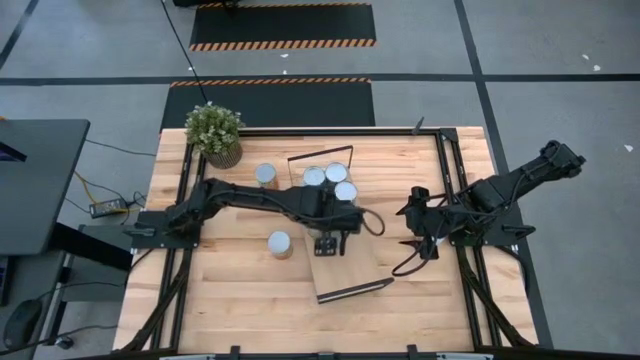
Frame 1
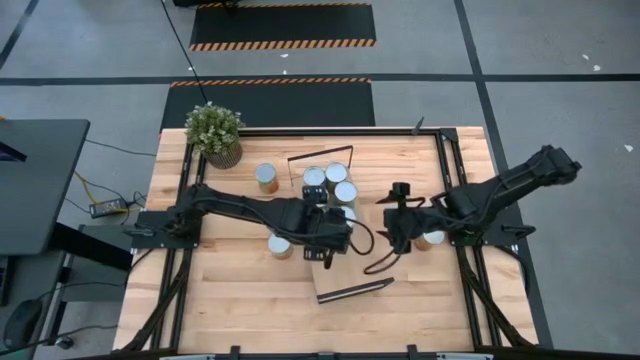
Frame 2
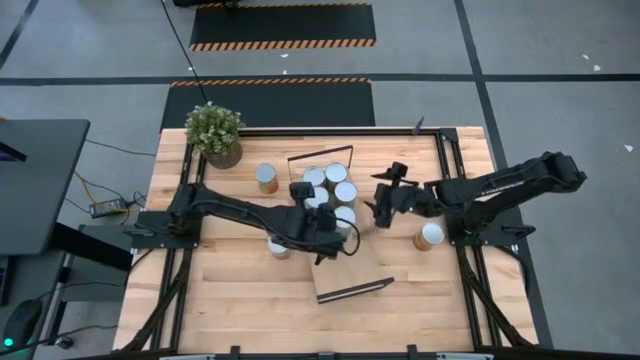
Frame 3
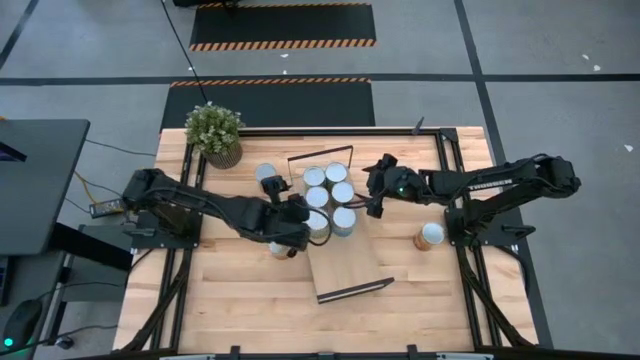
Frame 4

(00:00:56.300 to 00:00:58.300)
Task: Pick and place cans onto a shelf
Adjust the canned tomatoes on the shelf

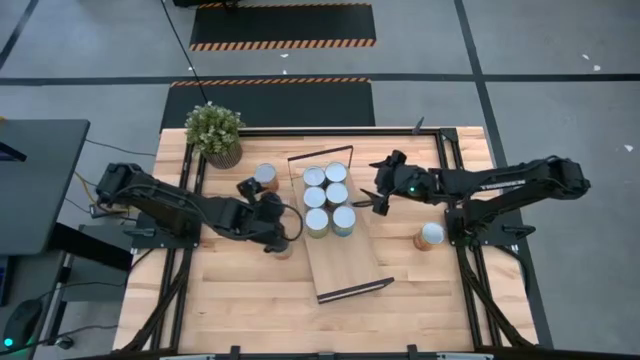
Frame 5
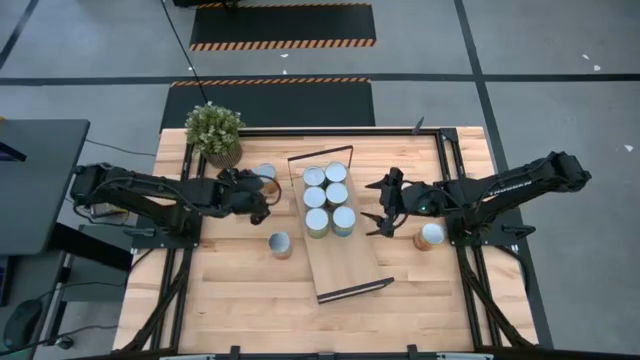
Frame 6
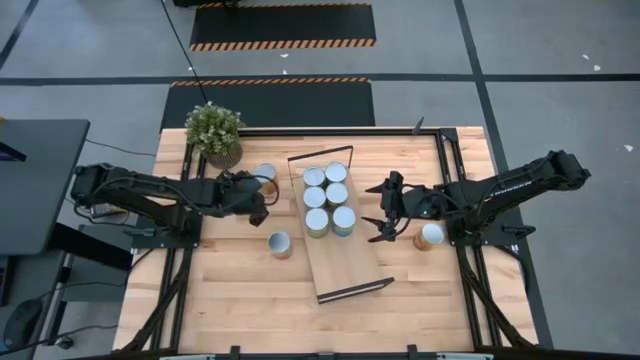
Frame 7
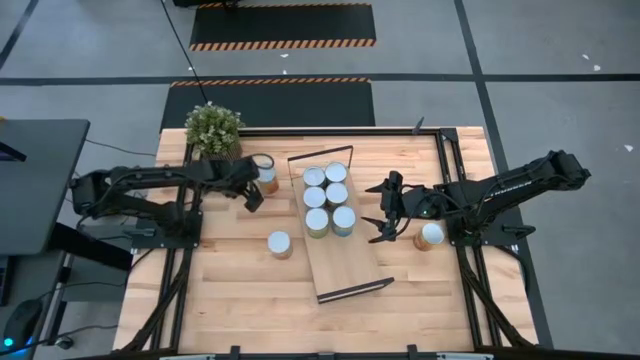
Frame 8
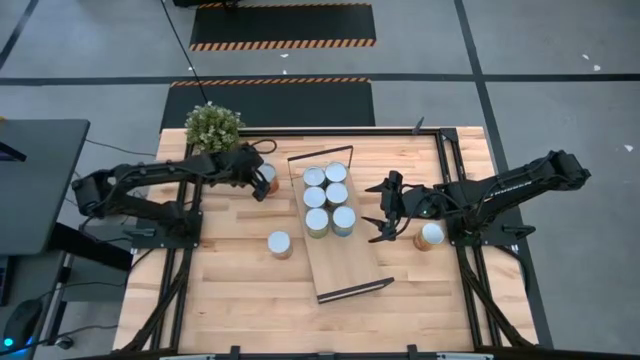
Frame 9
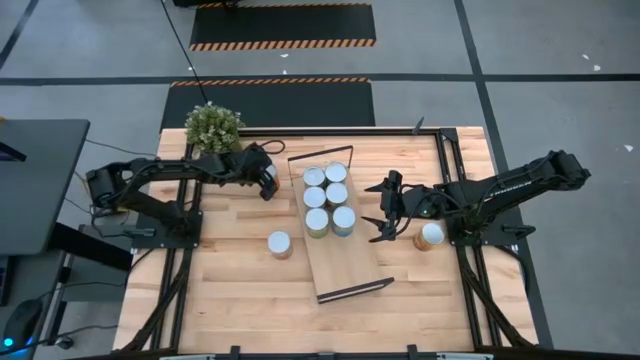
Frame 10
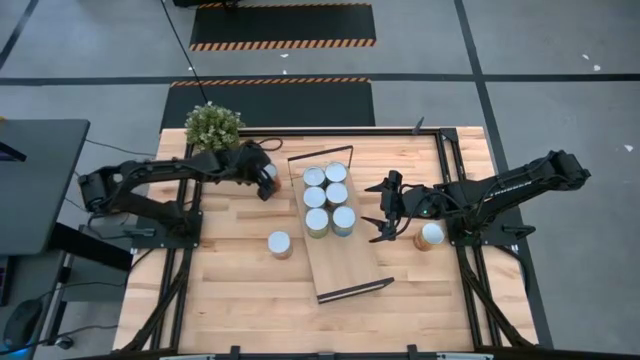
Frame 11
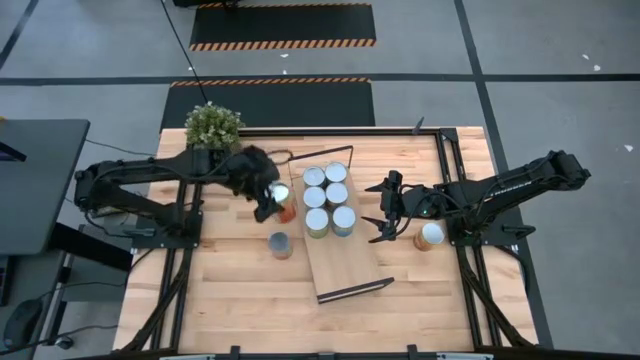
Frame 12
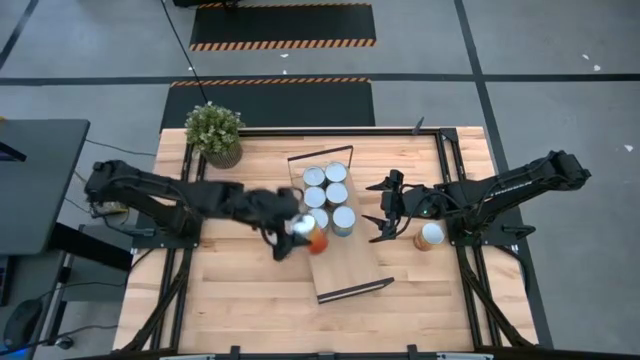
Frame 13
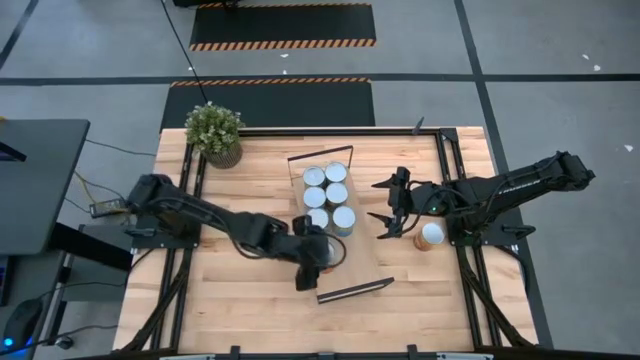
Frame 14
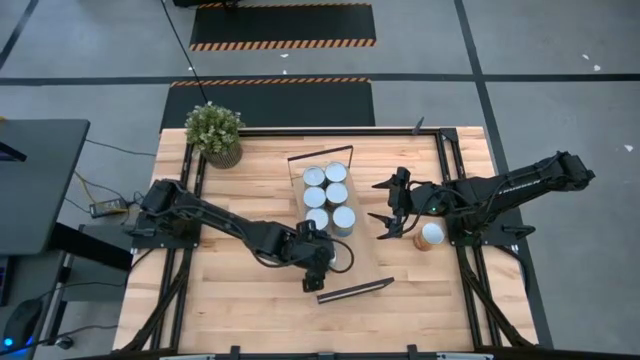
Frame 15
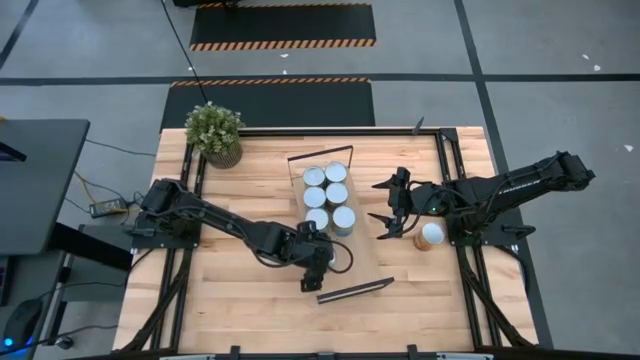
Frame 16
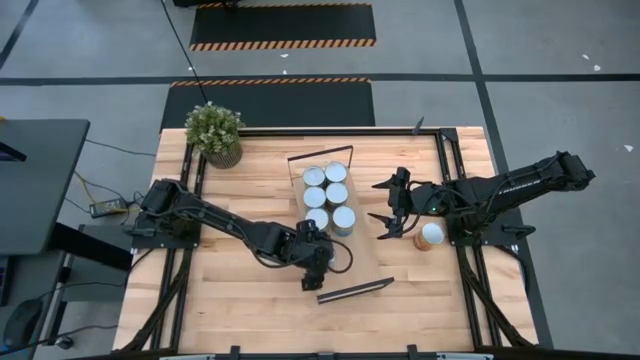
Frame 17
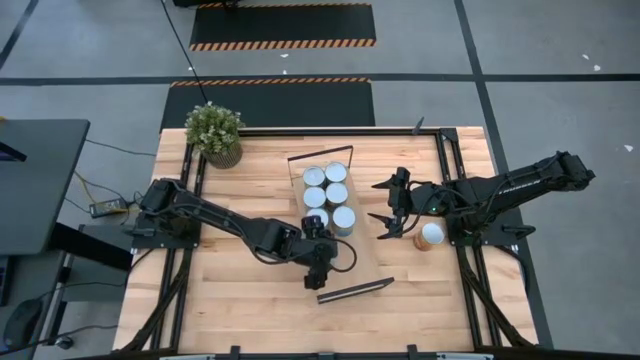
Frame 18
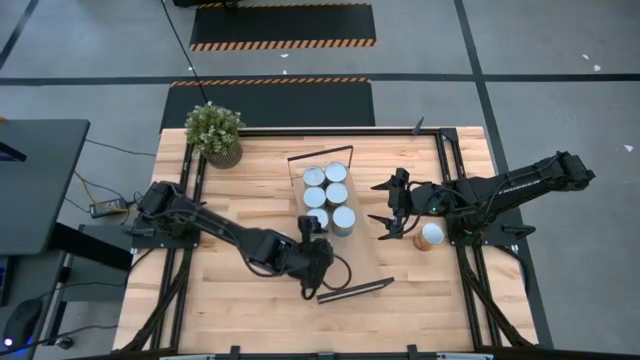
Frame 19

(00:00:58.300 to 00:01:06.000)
Put the top canned pineapples on the shelf

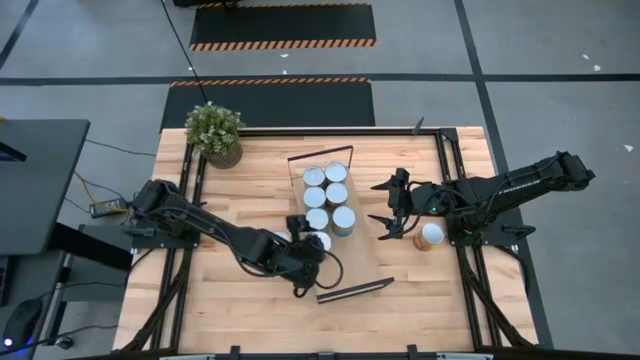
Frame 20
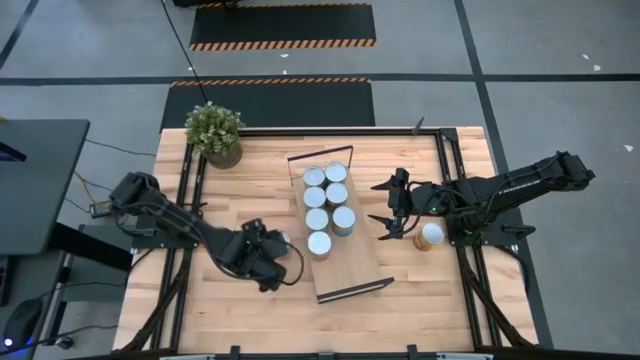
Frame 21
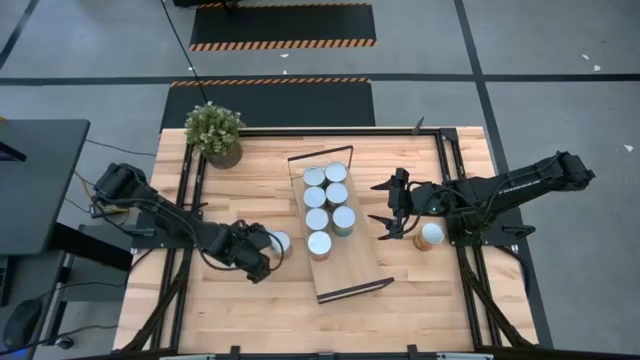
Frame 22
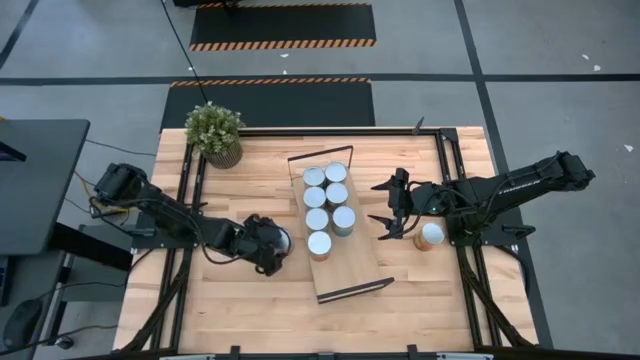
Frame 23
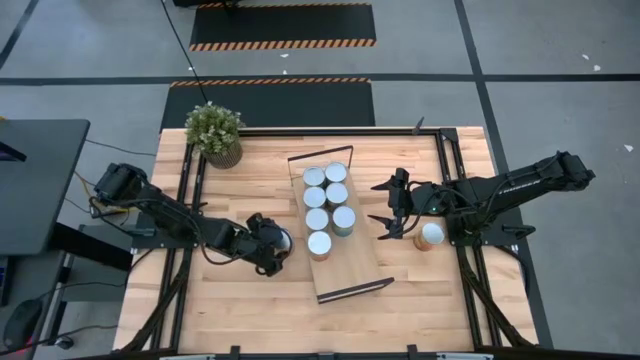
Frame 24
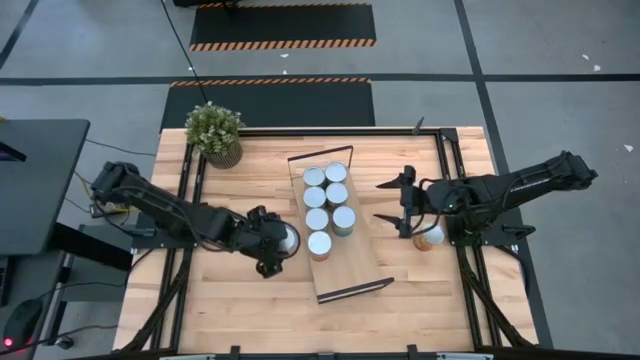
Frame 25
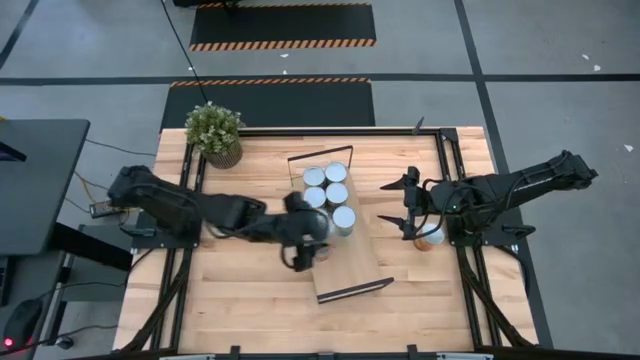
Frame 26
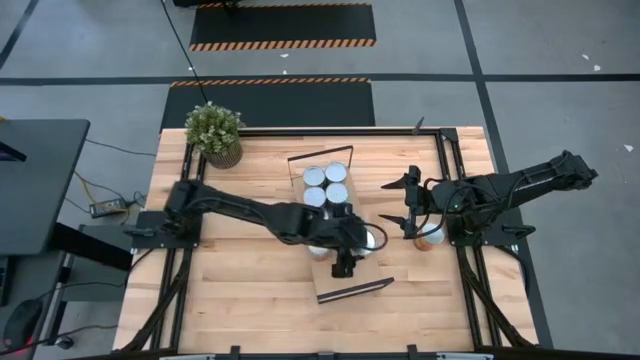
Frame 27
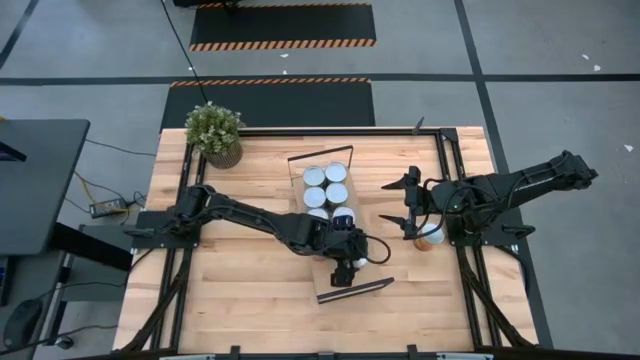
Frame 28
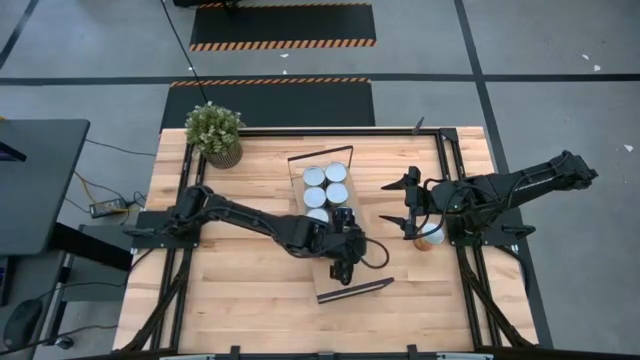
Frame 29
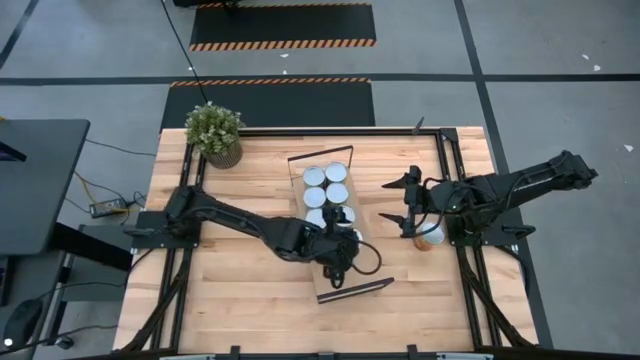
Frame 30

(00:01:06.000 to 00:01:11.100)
Put the canned pineapples on the shelf

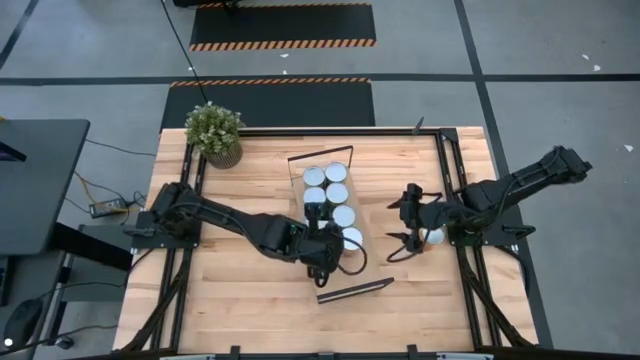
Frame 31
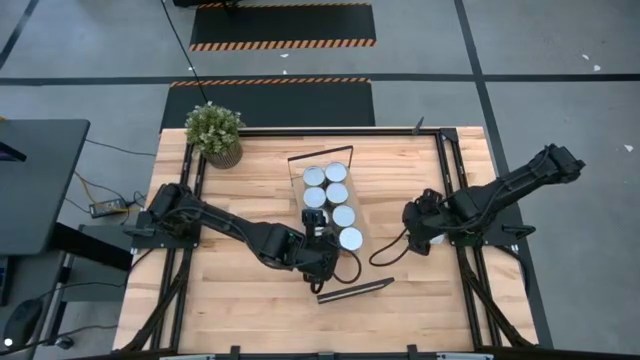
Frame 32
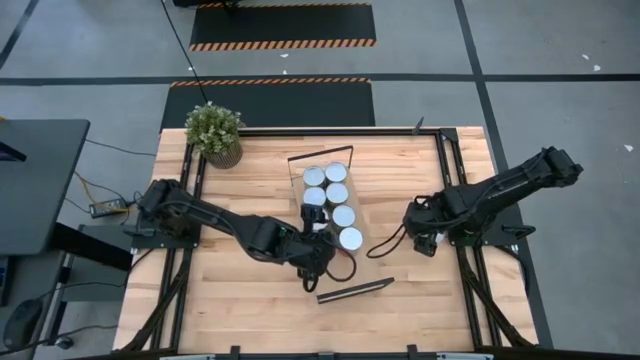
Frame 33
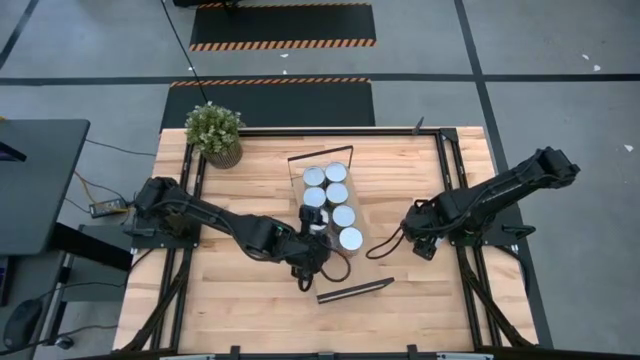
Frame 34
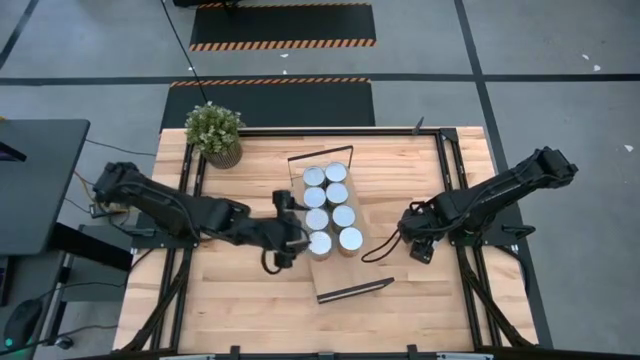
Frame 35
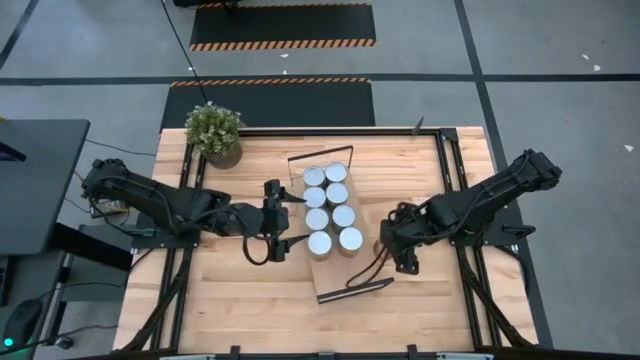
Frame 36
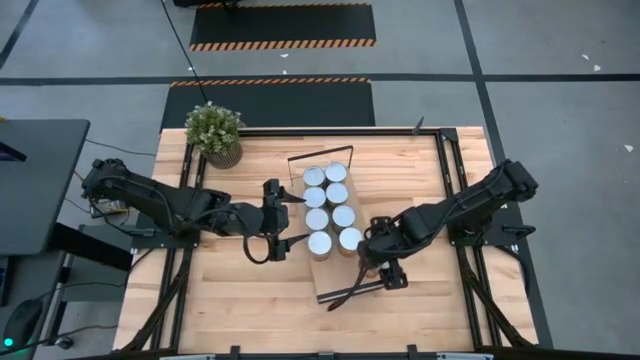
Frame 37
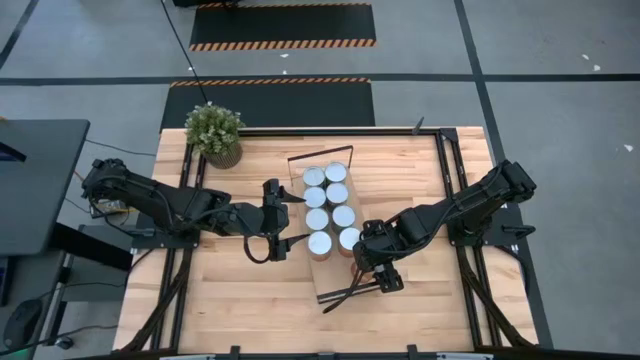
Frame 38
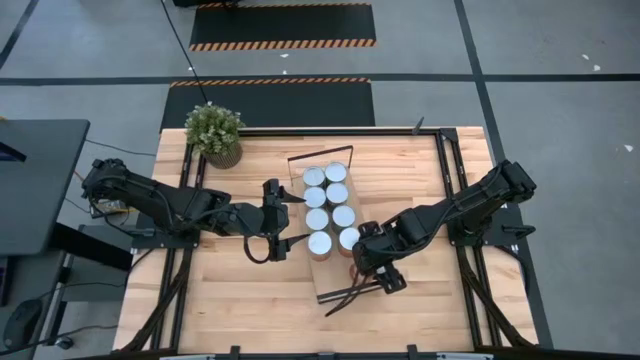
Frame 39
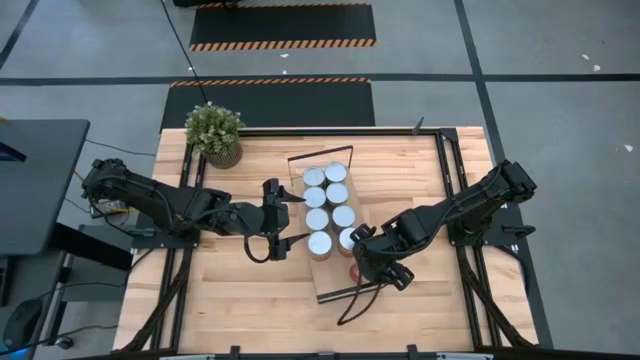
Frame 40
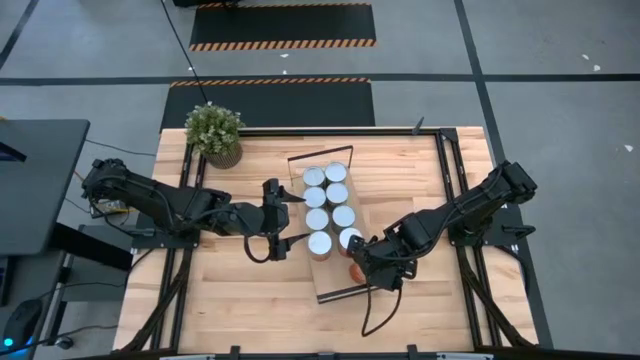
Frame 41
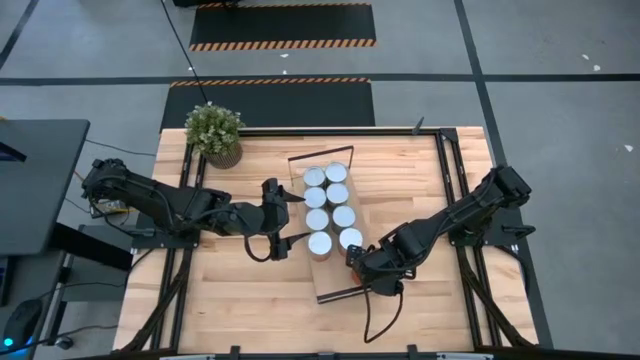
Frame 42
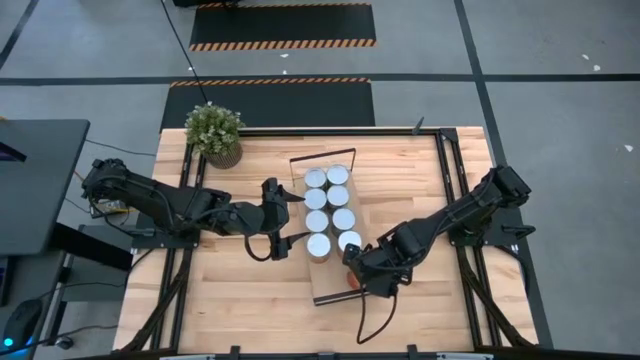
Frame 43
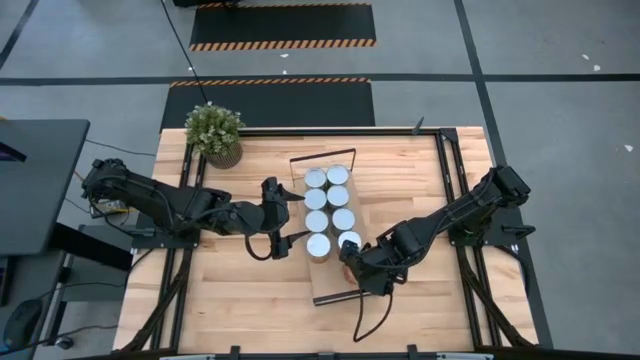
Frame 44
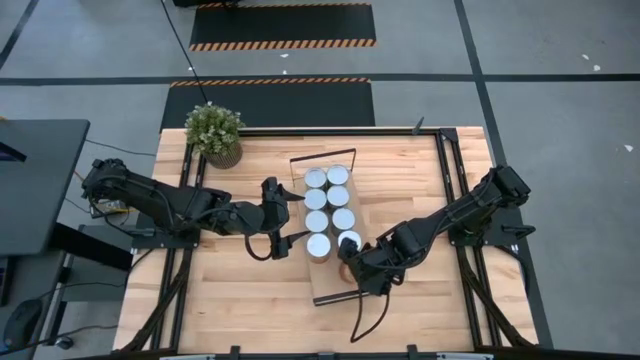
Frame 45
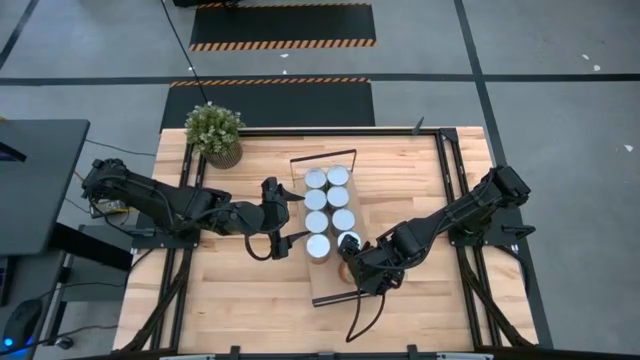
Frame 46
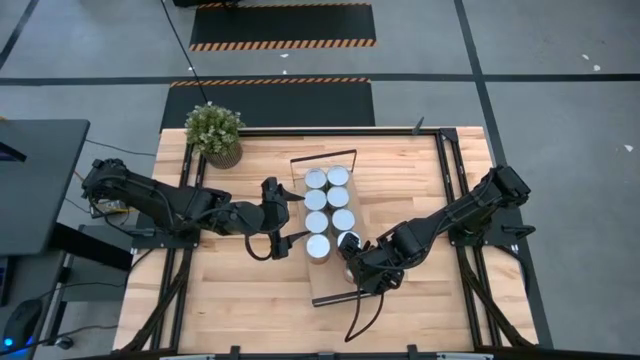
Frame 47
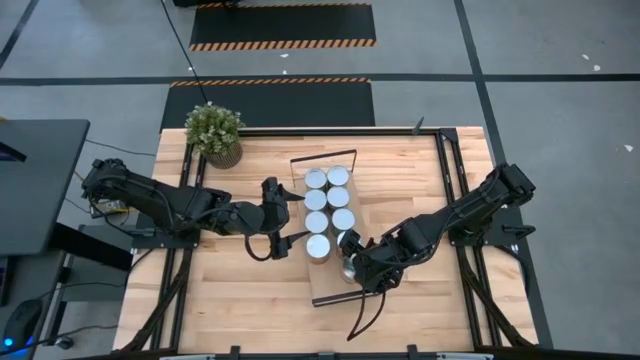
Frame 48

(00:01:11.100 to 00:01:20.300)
Put the canned corn on the shelf
